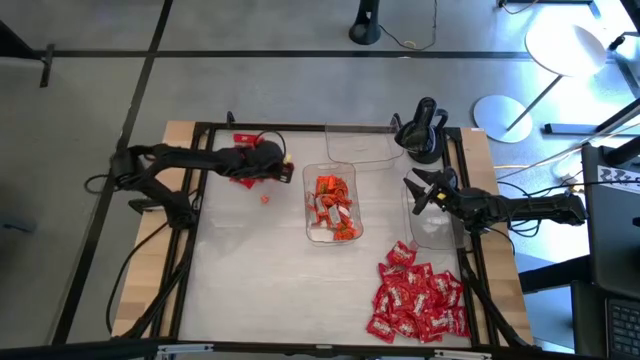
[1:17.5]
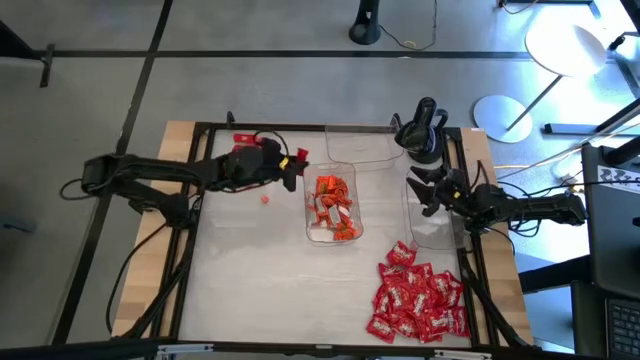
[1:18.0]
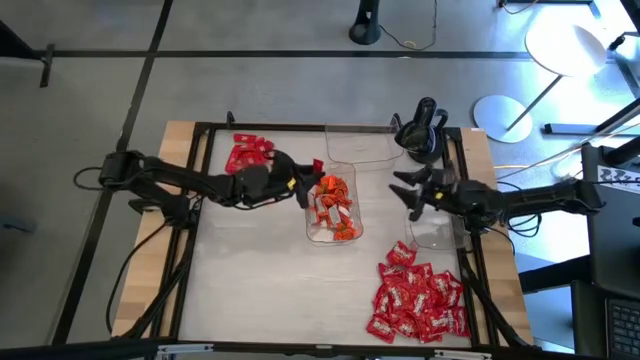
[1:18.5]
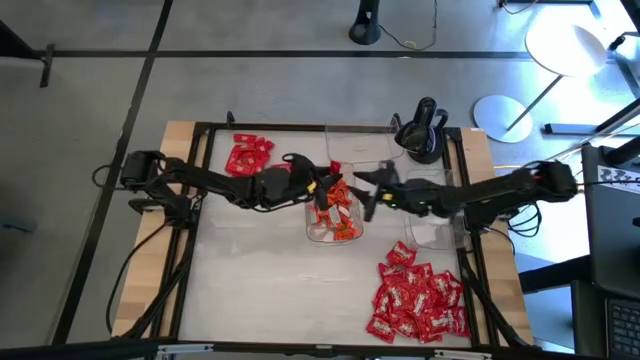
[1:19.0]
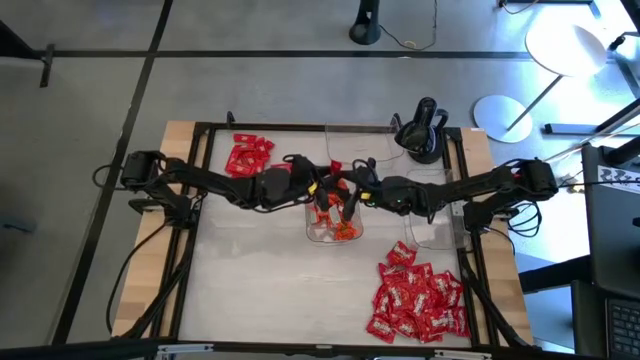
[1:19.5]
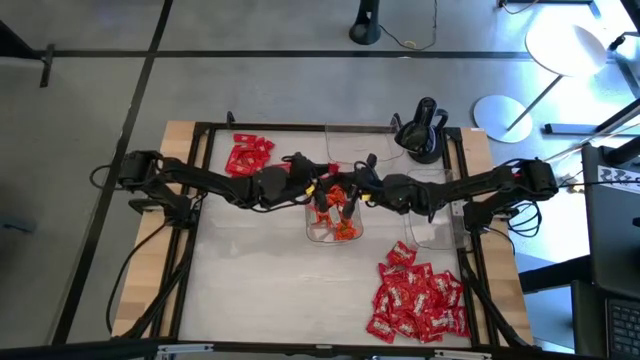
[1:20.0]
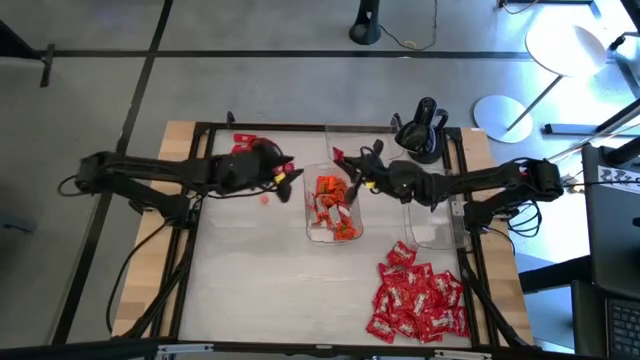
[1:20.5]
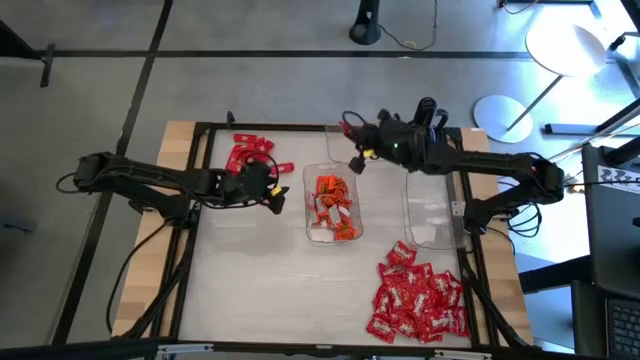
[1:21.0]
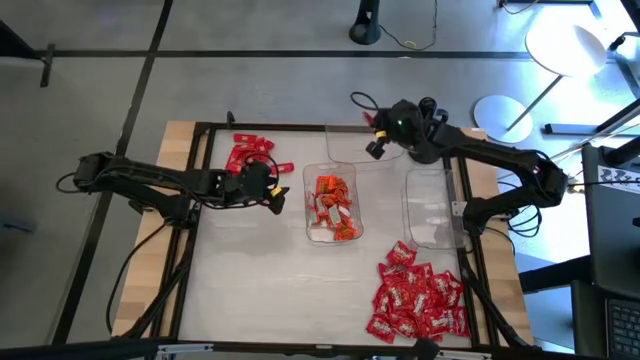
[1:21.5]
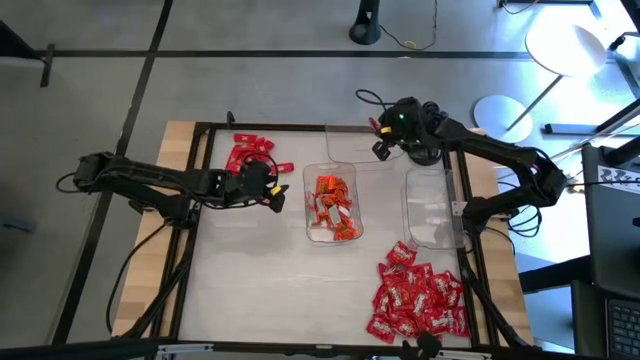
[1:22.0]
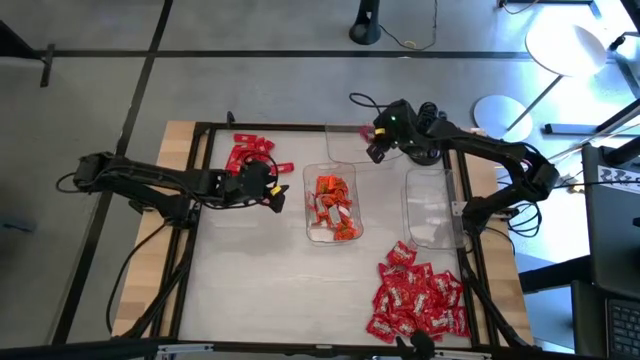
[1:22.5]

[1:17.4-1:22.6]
Task: Sort candy
Put the red chocolate into the top transparent bin

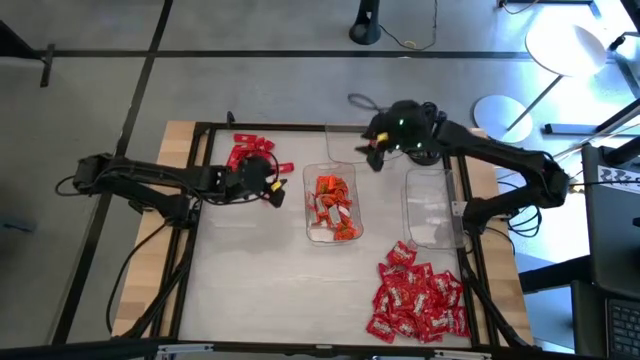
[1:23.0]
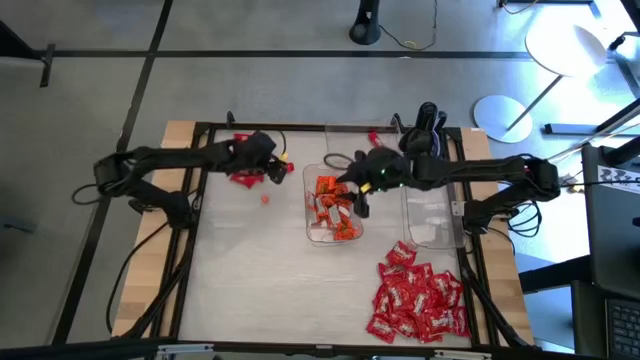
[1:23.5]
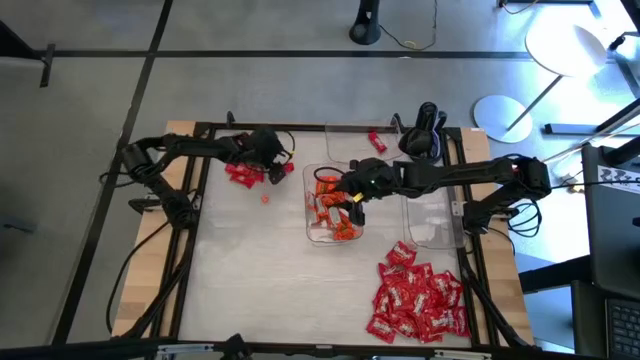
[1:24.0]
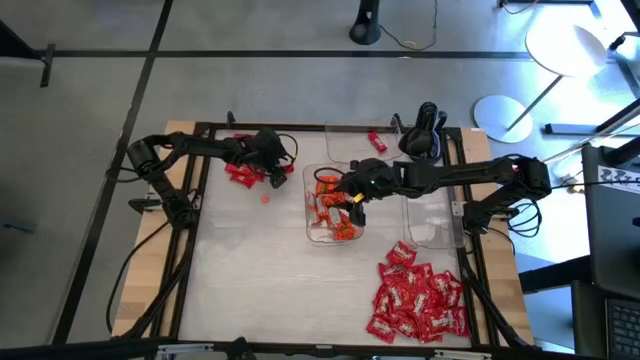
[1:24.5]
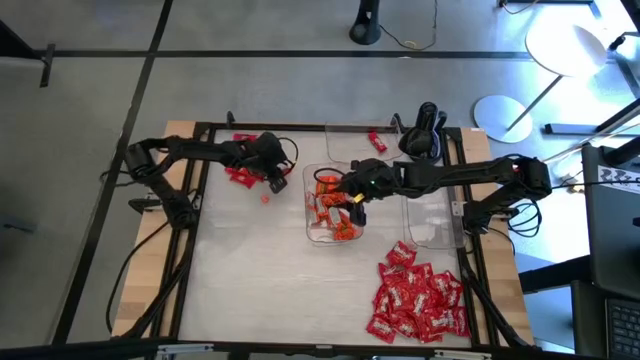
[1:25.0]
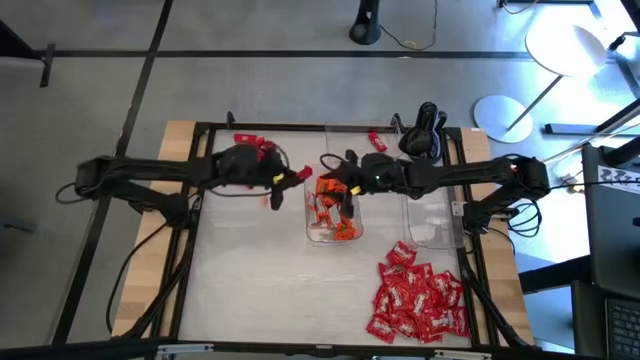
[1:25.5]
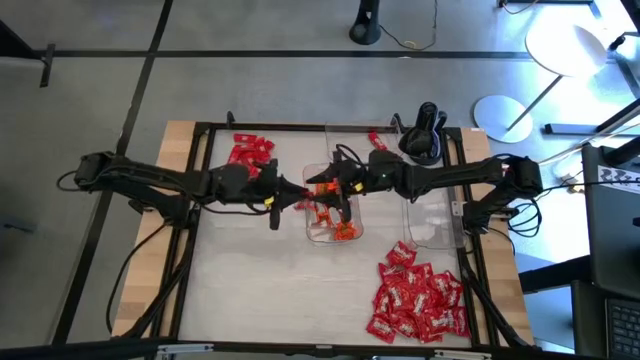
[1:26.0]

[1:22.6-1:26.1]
Put the red chocolate into the top transparent bin

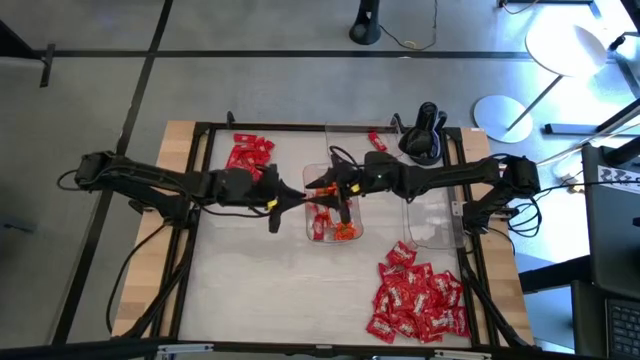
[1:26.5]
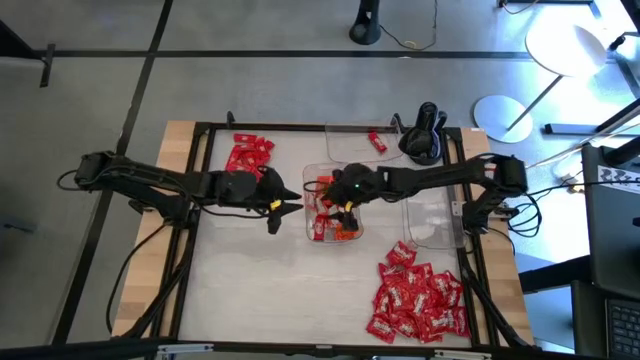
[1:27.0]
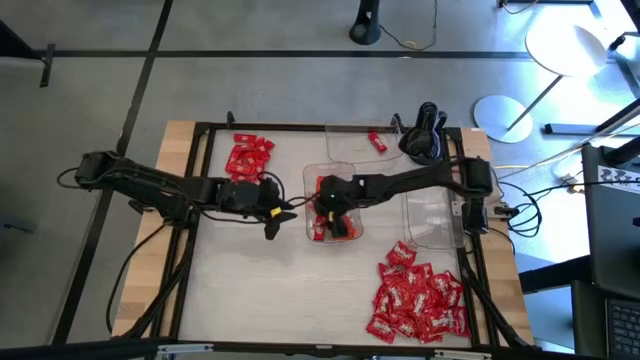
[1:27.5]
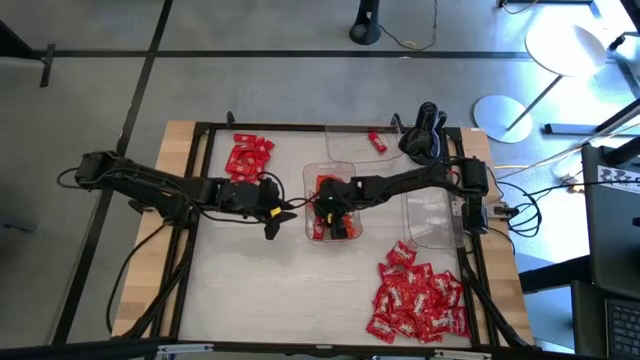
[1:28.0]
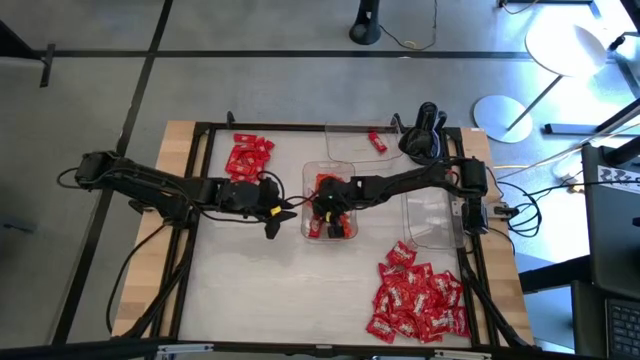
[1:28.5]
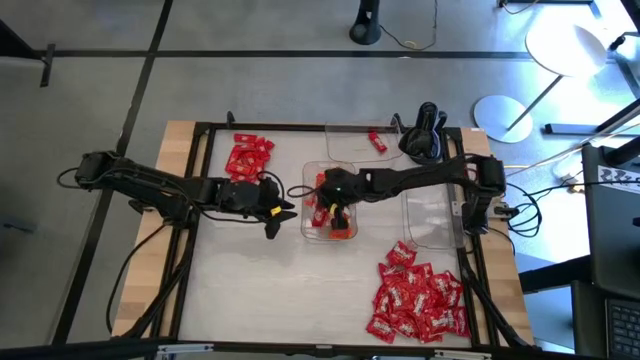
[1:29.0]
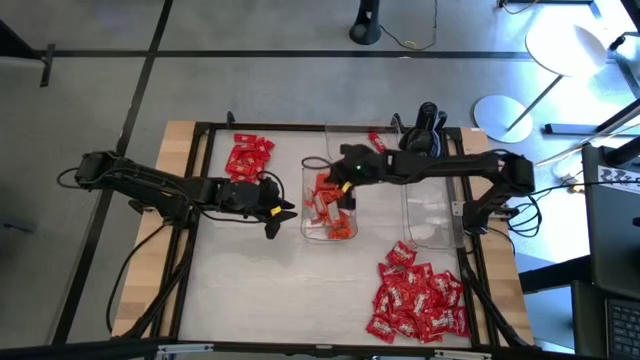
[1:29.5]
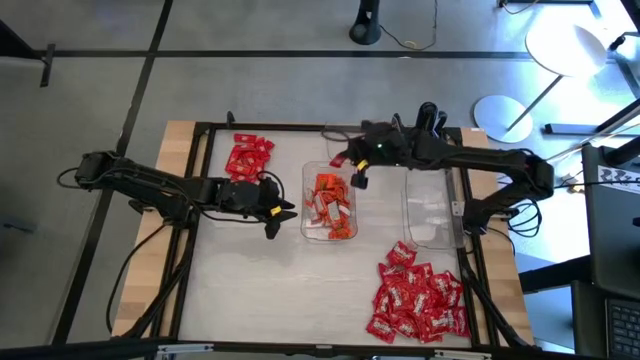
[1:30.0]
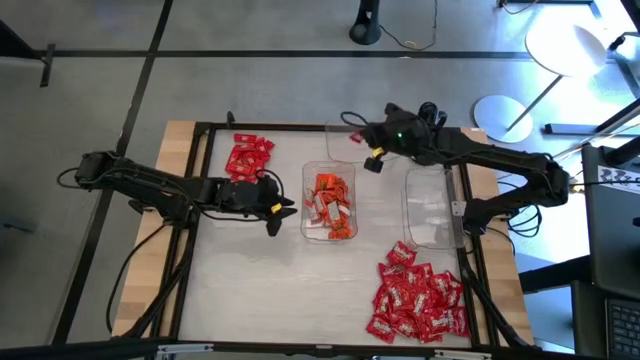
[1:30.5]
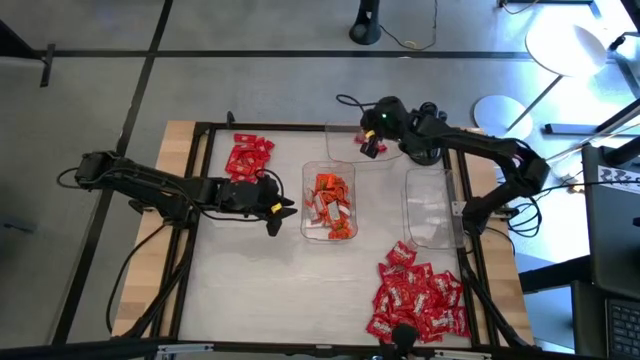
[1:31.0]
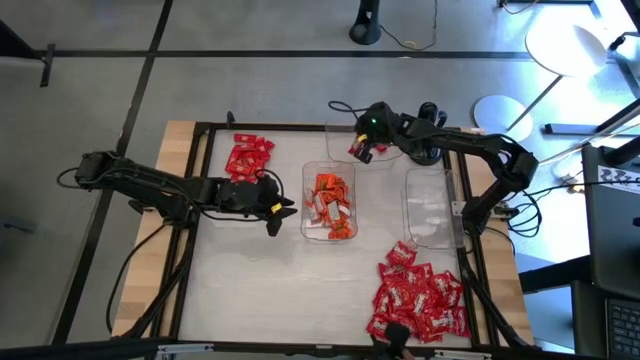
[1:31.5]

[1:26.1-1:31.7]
Put the red chocolate into the top transparent bin

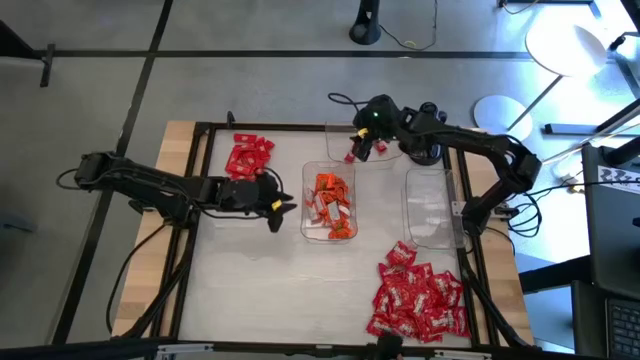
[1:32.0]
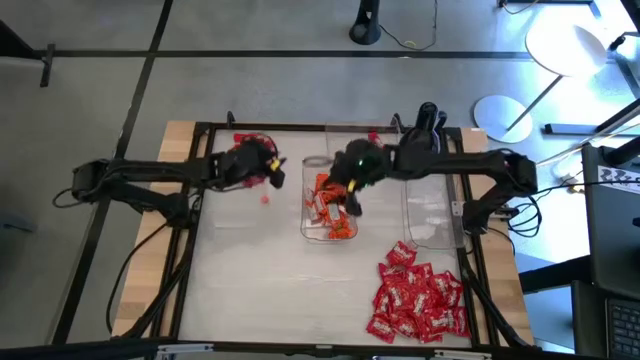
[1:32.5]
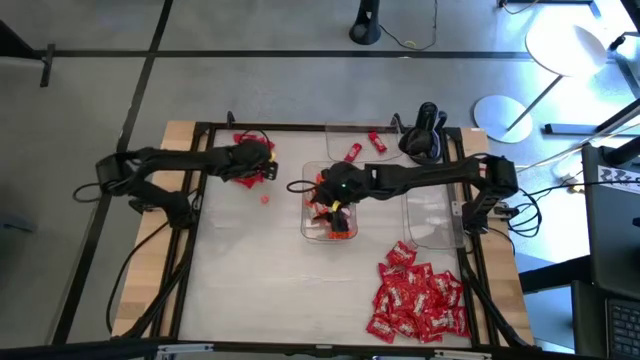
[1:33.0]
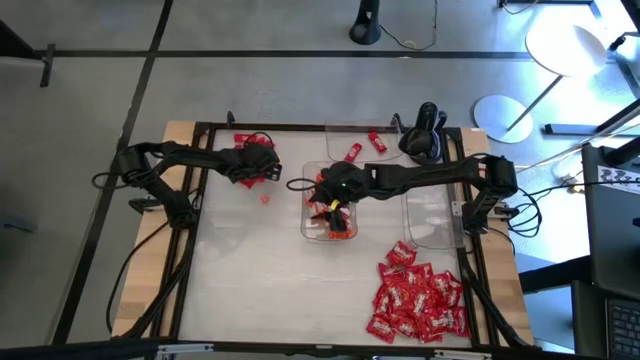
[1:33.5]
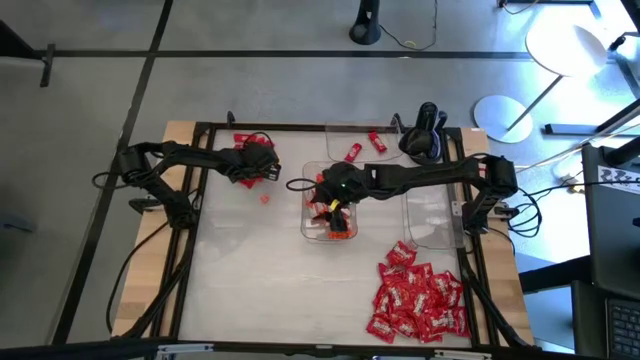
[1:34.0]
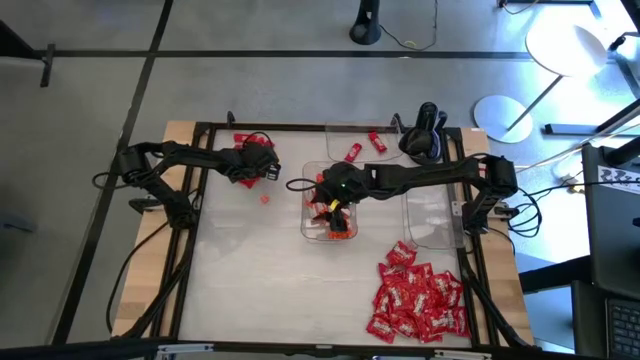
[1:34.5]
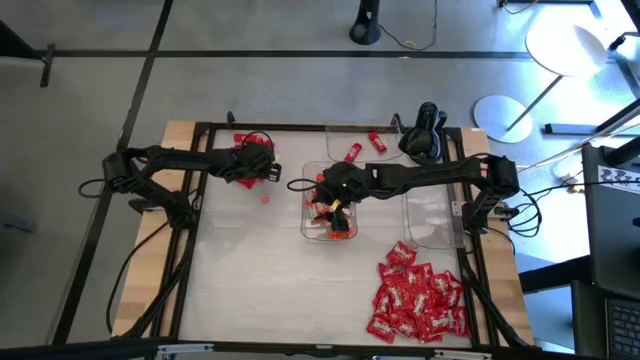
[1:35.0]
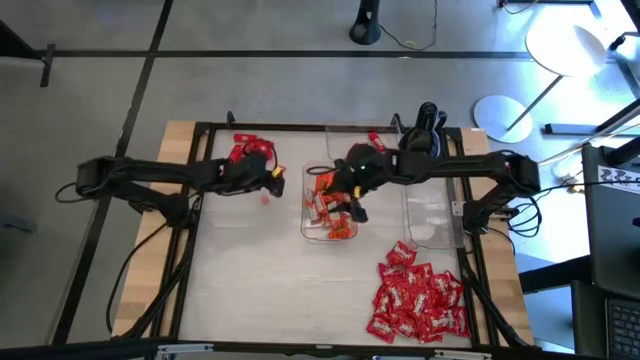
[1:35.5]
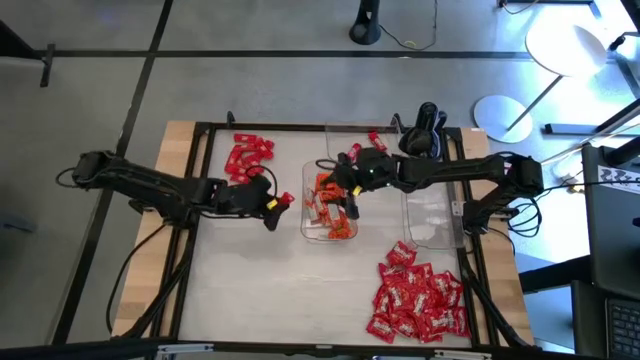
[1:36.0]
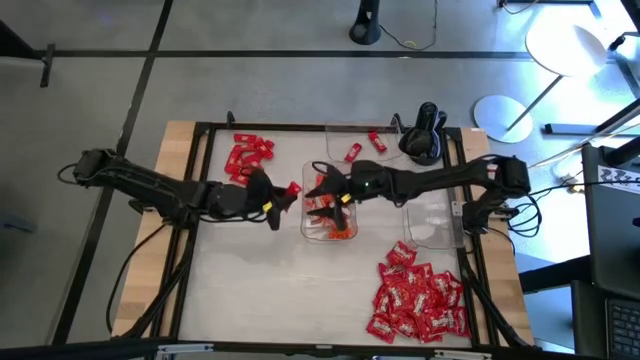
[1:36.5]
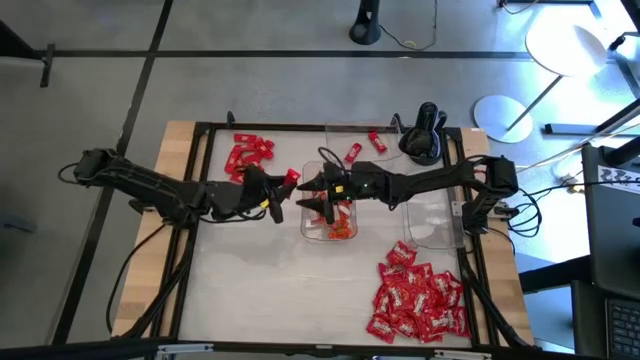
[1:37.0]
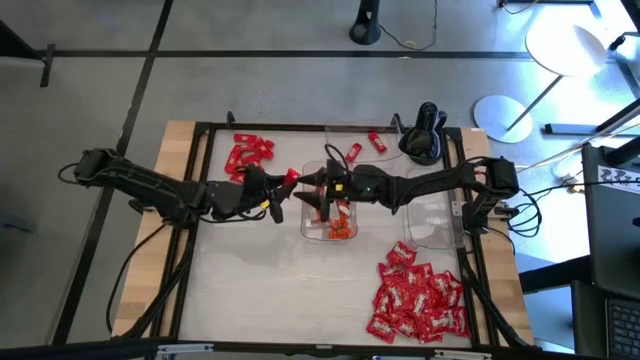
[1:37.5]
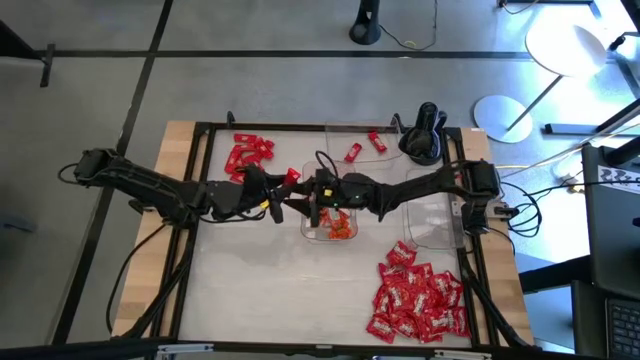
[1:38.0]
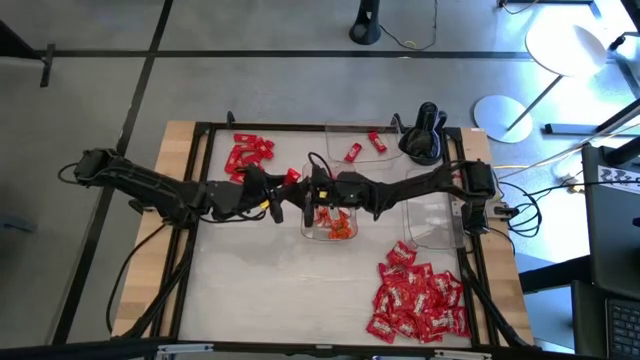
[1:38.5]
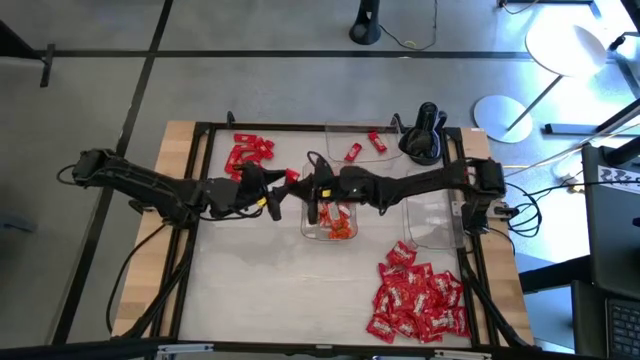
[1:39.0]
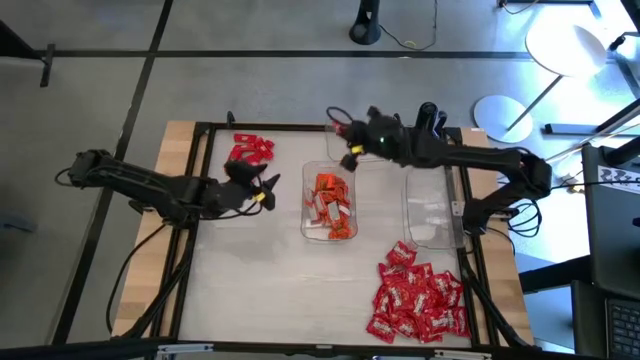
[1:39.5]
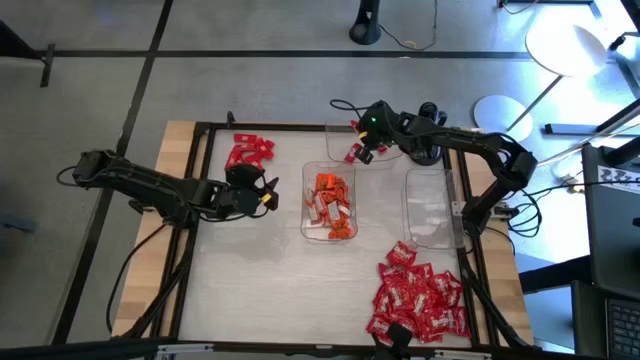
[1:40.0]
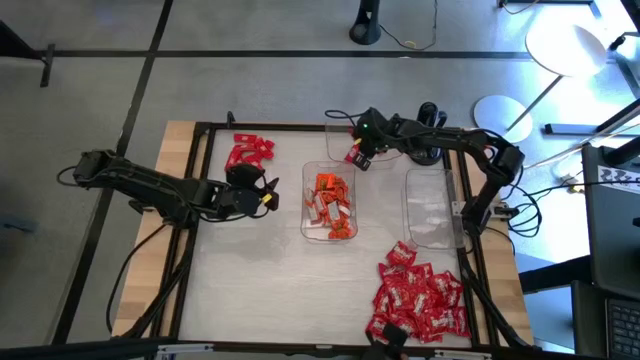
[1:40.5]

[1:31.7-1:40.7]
Put the red chocolate into the top transparent bin
